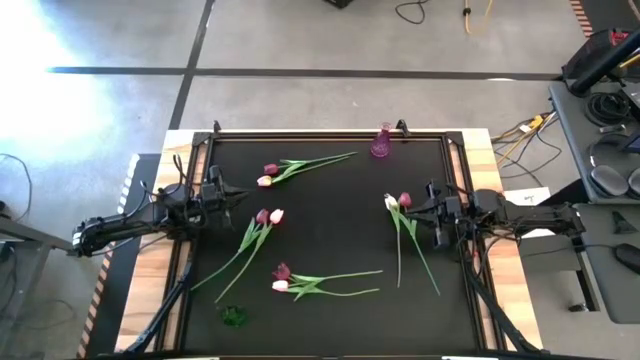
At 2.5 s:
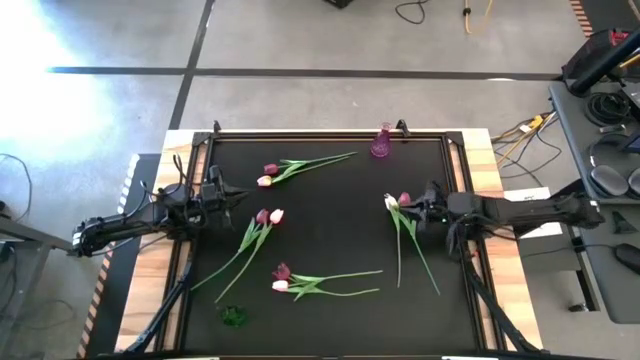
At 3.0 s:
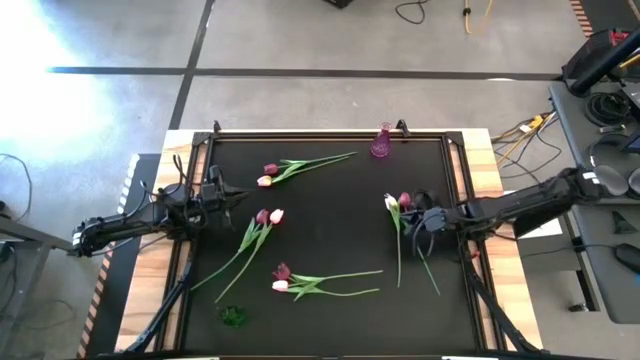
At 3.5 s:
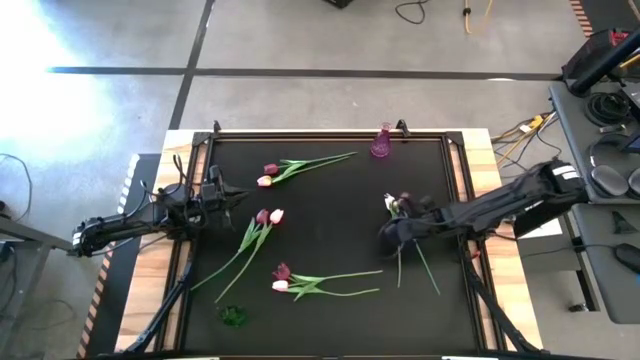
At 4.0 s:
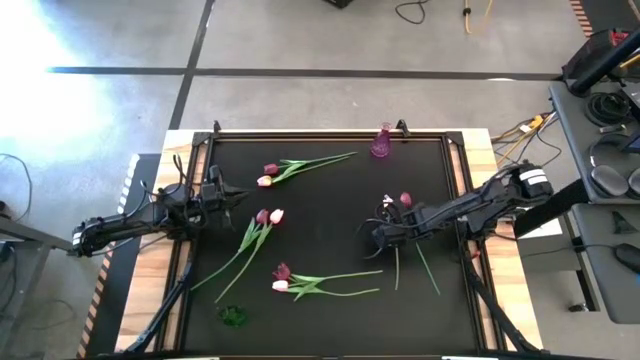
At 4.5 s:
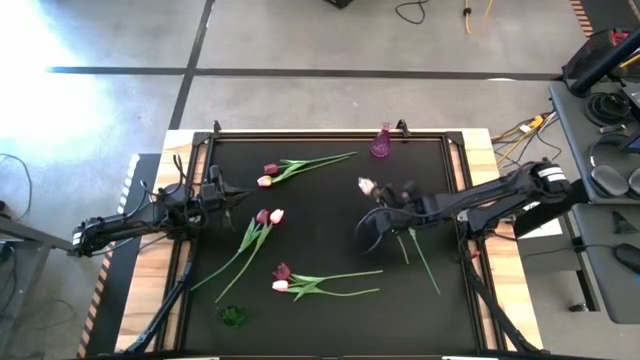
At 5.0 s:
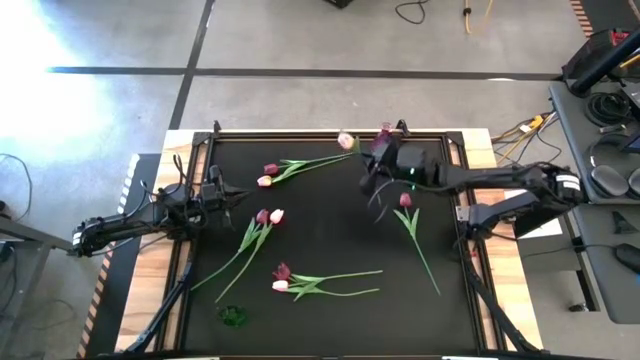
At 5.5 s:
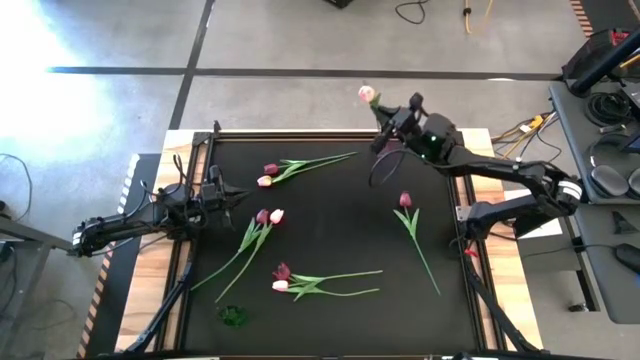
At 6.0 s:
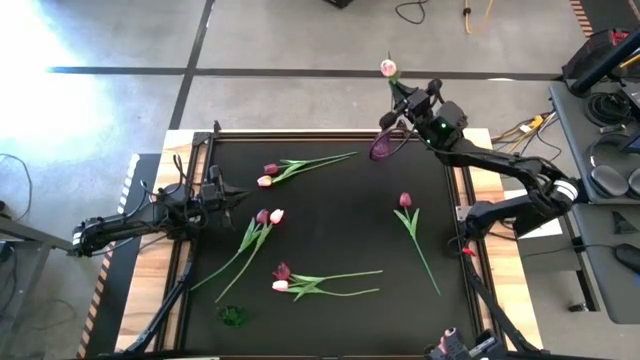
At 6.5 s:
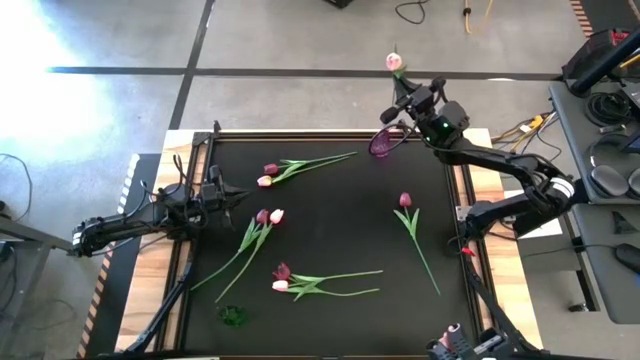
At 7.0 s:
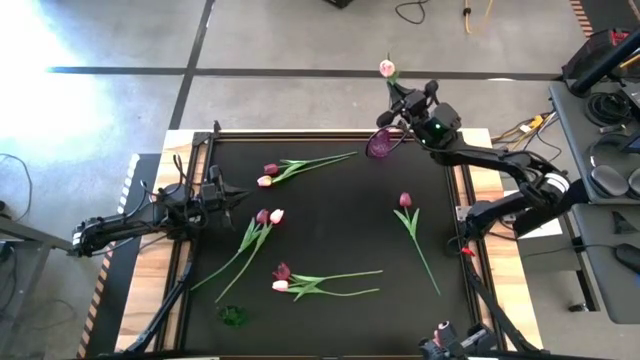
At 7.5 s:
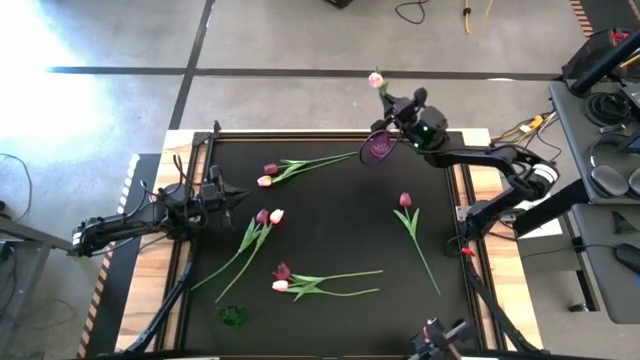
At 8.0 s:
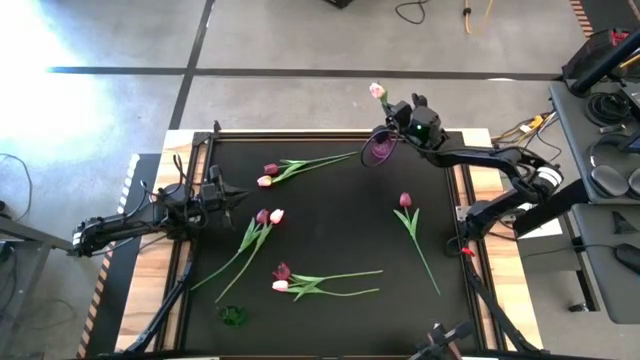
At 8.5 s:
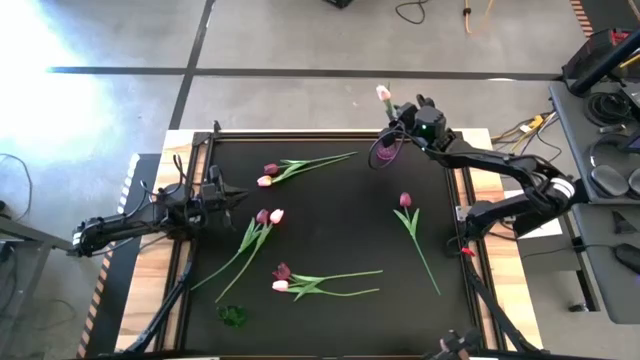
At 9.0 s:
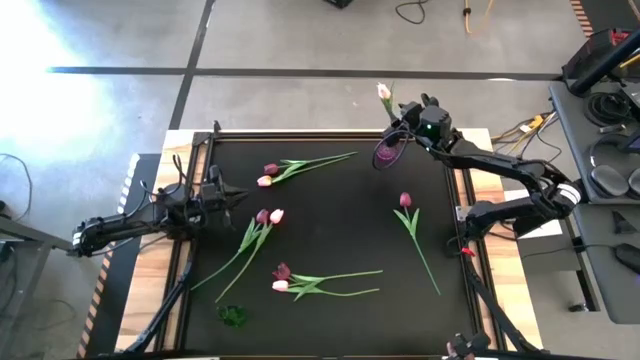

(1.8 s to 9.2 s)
Task: Sort flowers into vase by color
Put the pink flower into the violet vase

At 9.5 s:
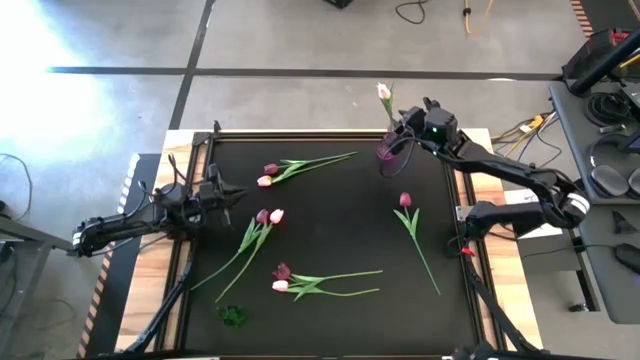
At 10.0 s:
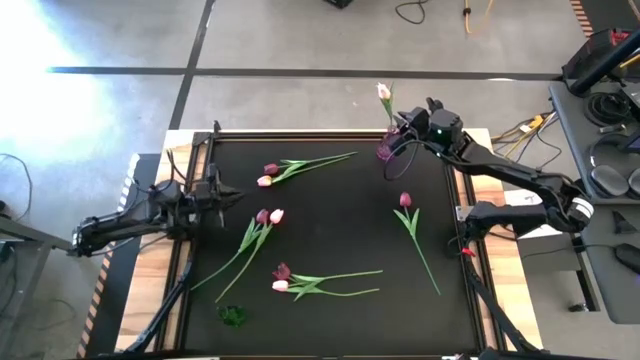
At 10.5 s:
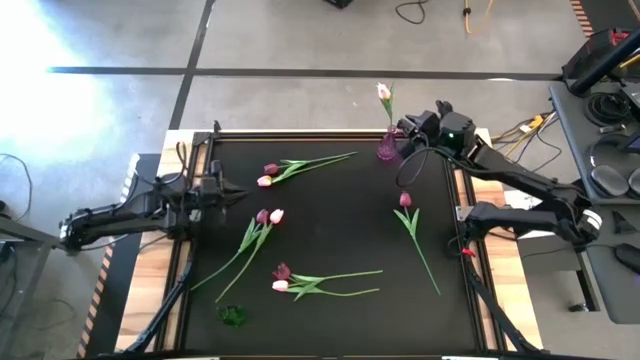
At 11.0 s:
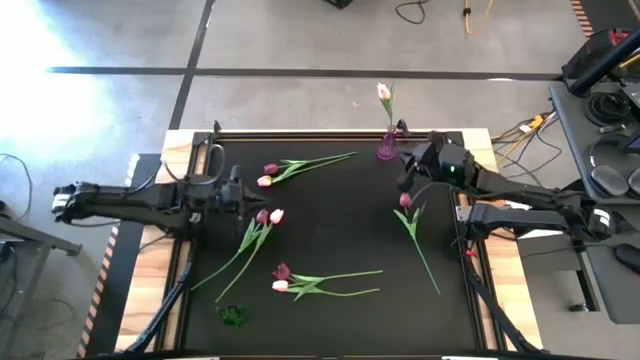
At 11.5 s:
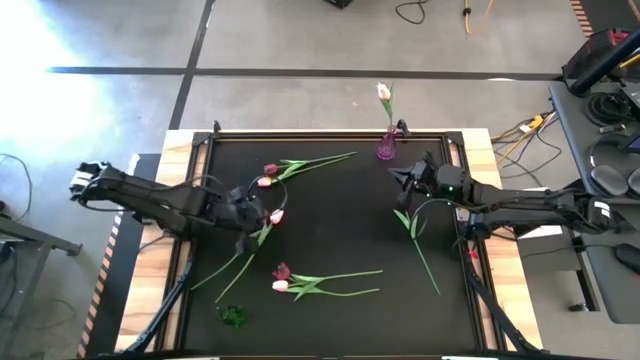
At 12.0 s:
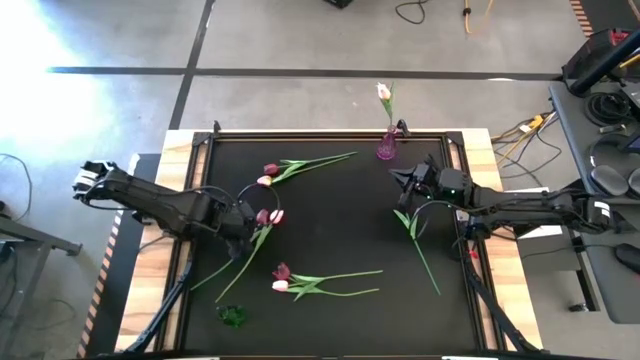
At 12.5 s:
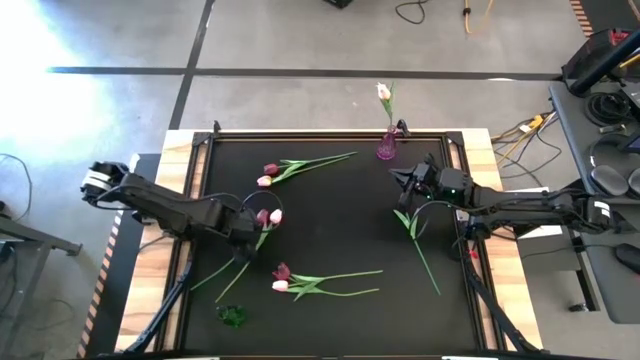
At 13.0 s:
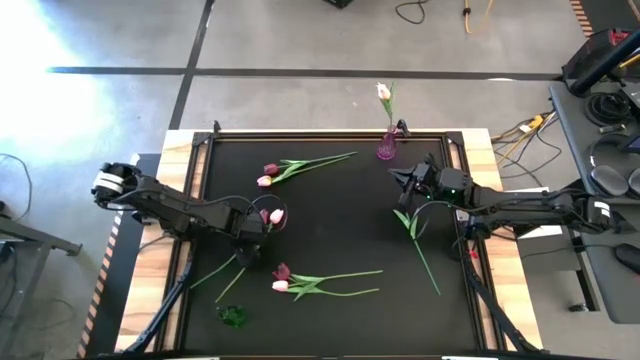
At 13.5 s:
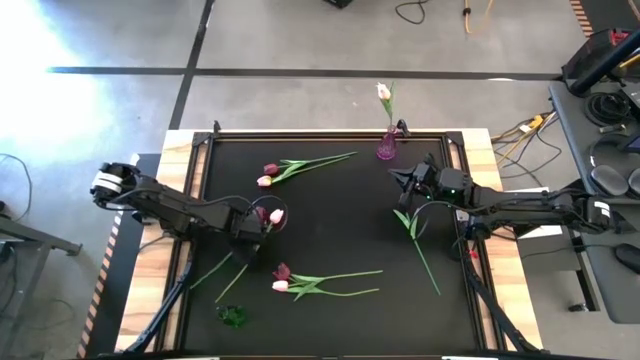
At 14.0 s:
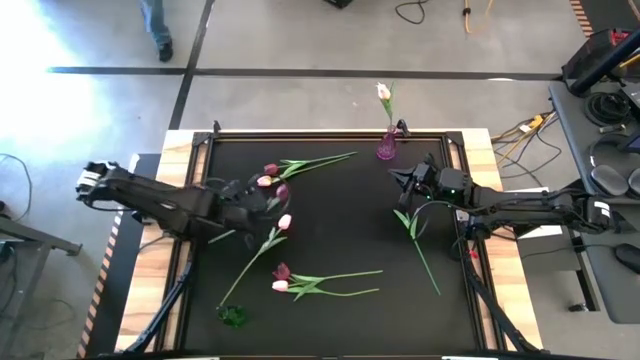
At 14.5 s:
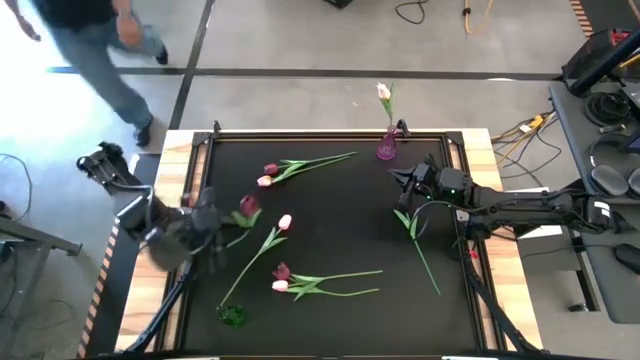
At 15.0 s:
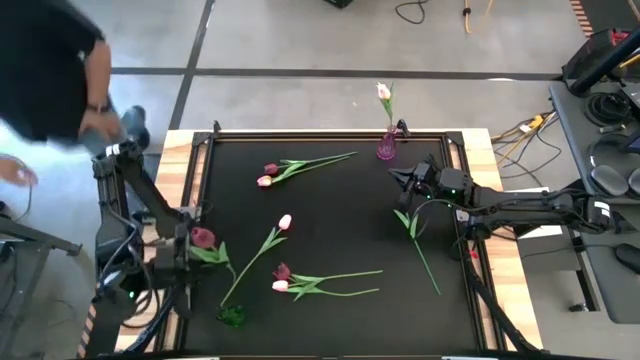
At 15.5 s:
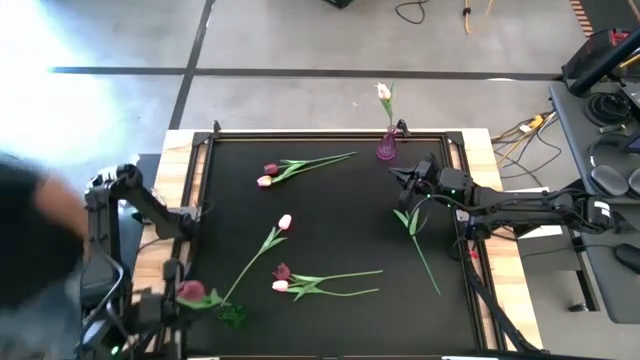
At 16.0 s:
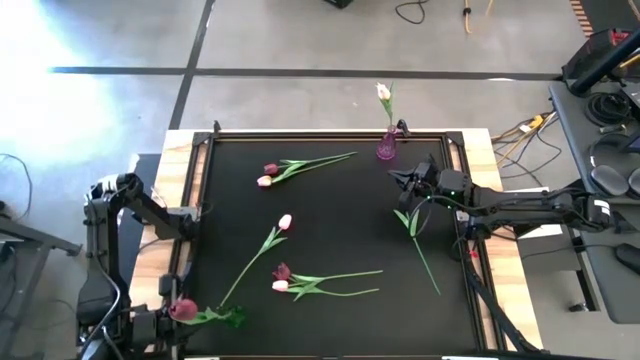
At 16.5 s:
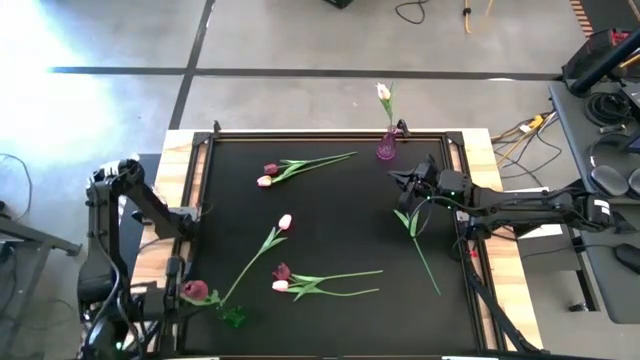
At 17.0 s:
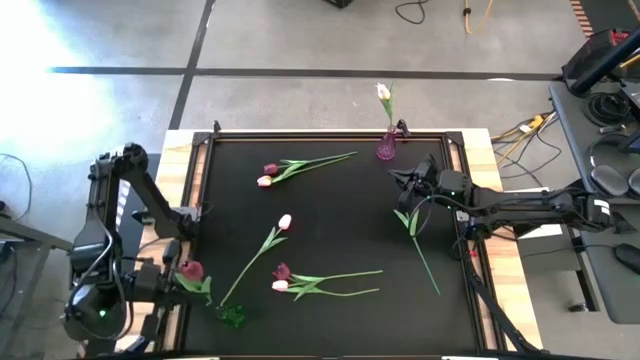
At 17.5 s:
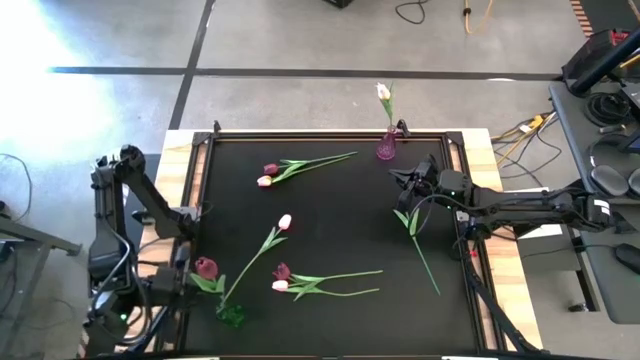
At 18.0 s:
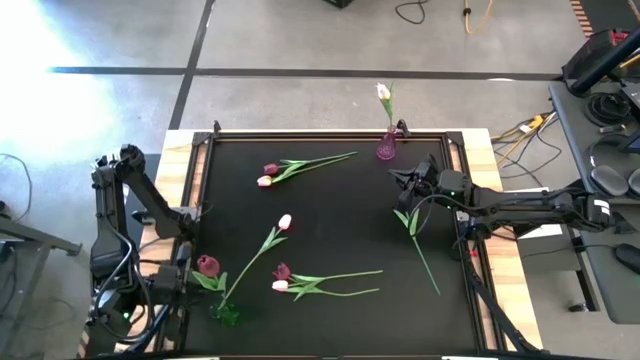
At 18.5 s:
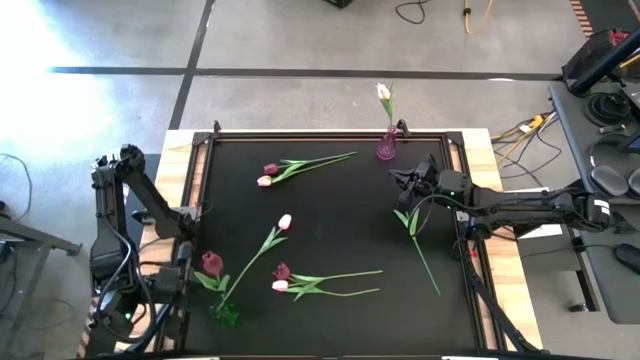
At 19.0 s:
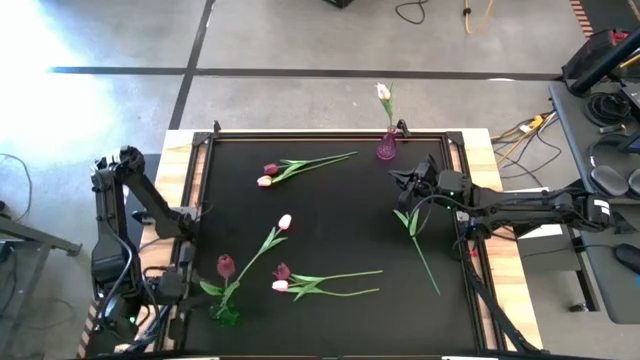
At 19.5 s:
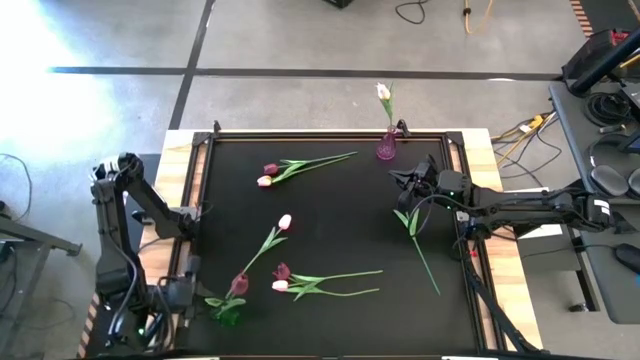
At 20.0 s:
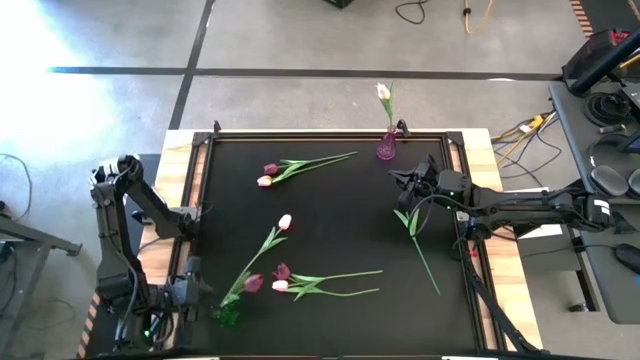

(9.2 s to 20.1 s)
Put the red flower into the green vase

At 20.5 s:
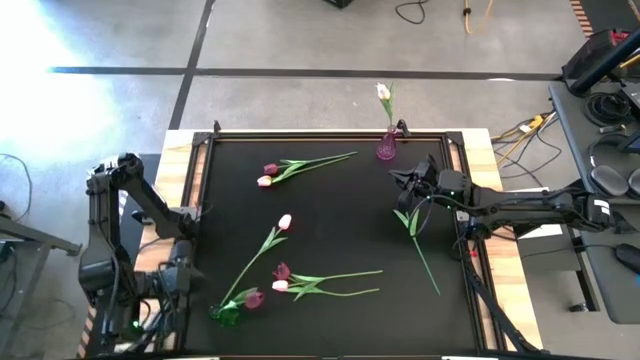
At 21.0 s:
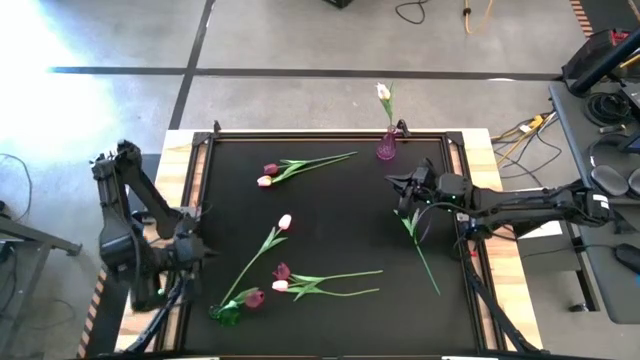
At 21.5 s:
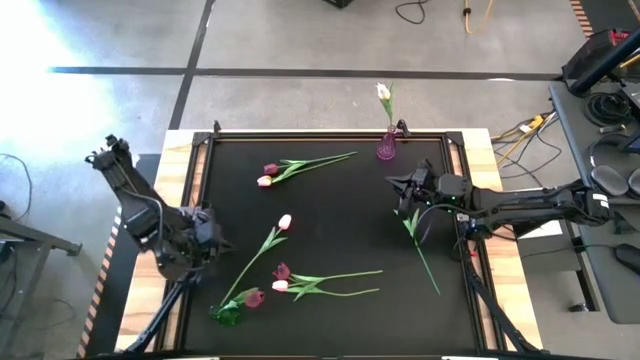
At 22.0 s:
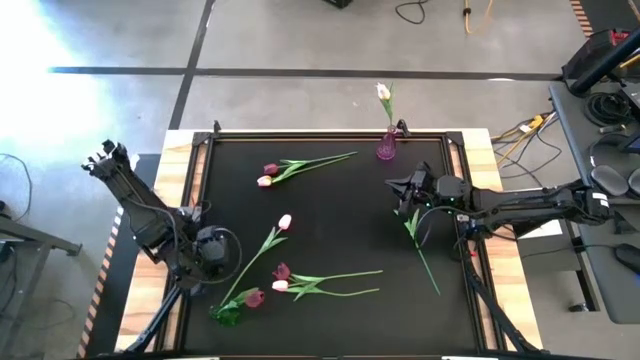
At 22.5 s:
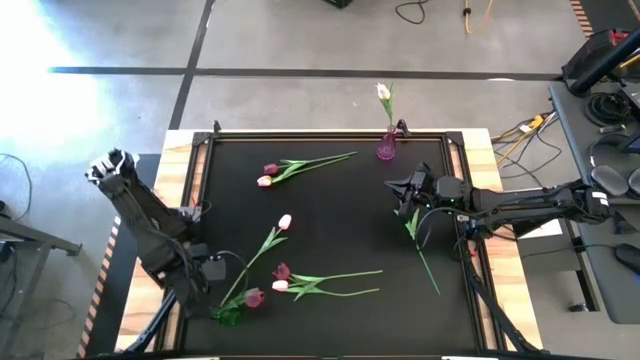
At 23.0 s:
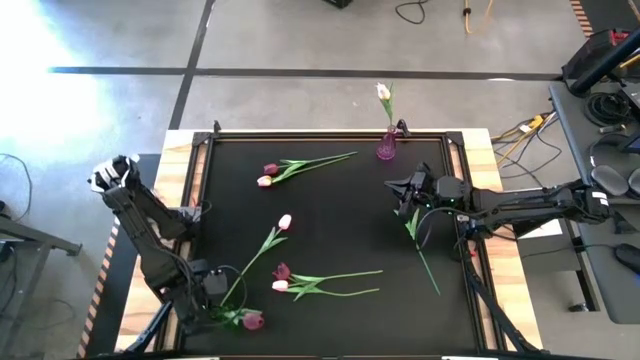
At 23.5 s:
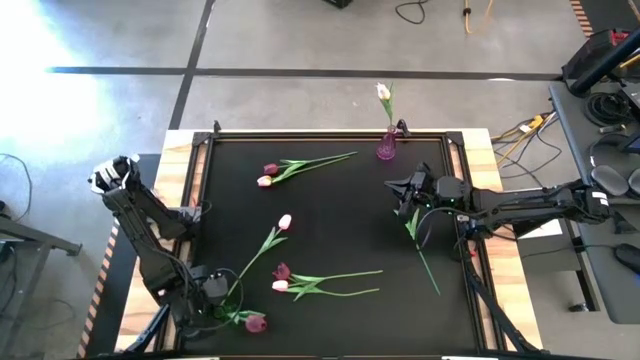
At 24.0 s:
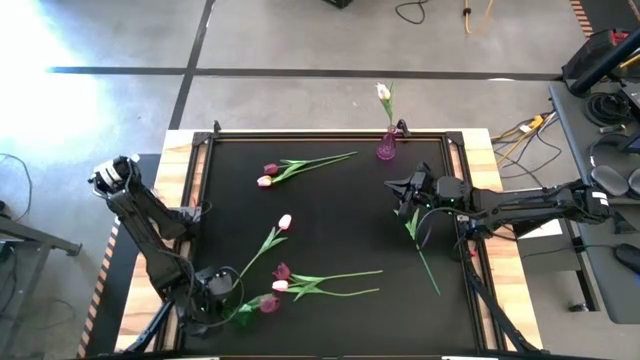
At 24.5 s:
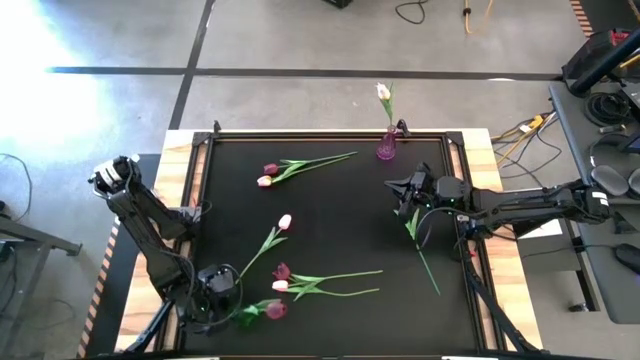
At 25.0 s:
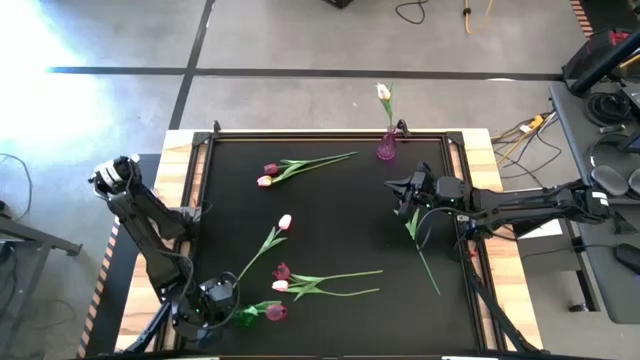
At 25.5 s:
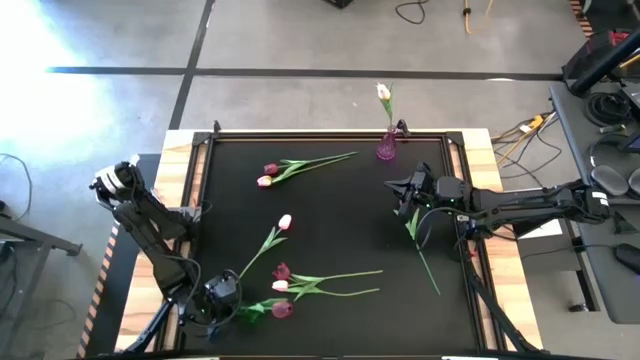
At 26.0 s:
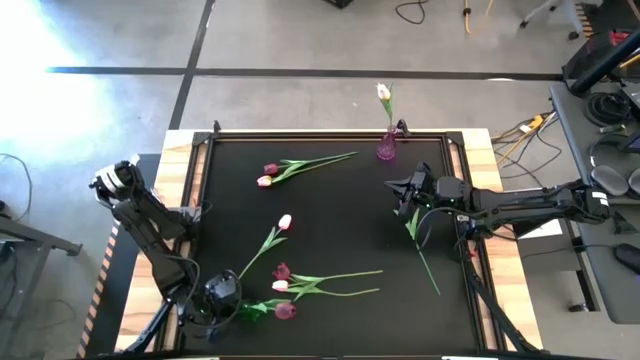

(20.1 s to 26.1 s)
Adjust the green vase
